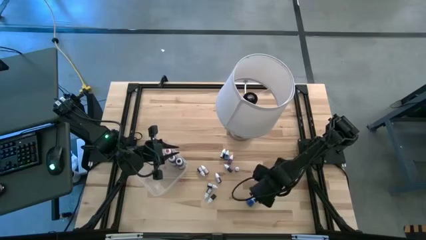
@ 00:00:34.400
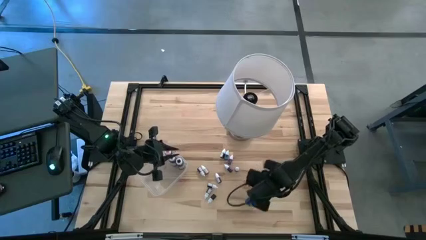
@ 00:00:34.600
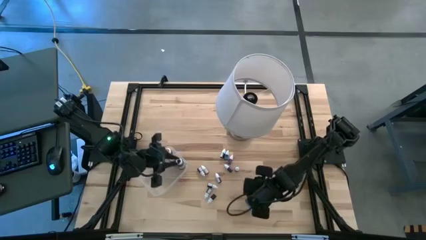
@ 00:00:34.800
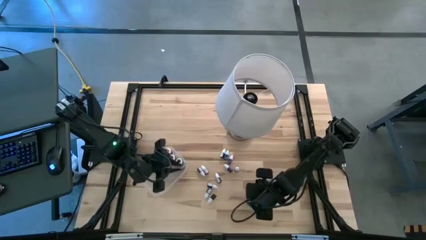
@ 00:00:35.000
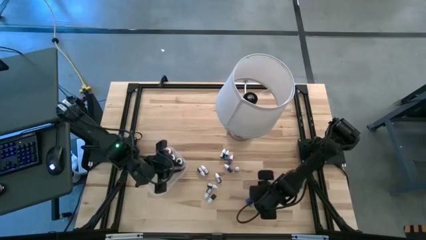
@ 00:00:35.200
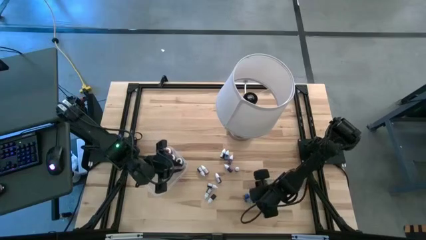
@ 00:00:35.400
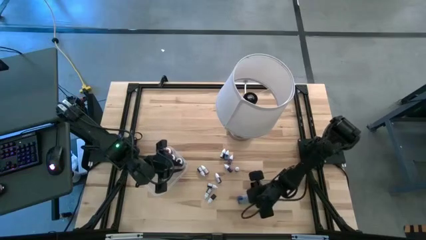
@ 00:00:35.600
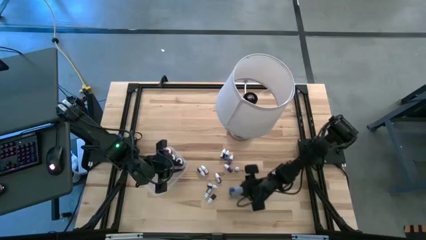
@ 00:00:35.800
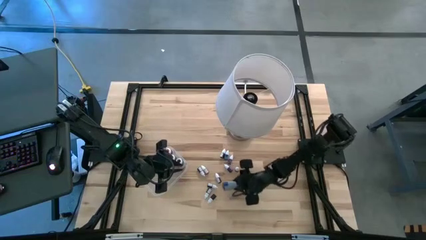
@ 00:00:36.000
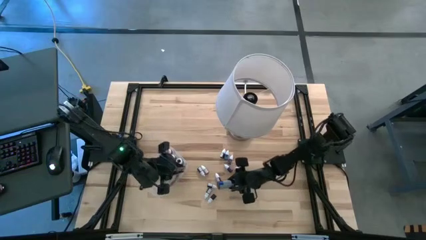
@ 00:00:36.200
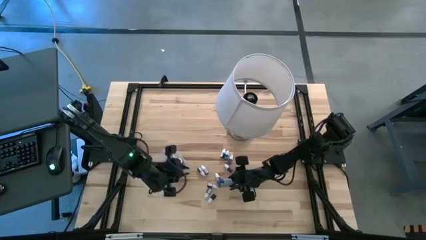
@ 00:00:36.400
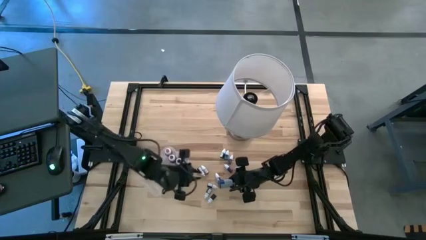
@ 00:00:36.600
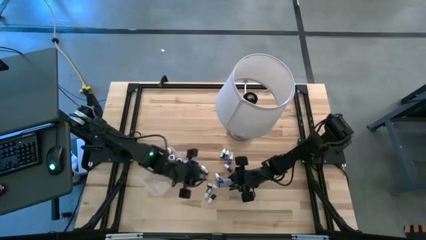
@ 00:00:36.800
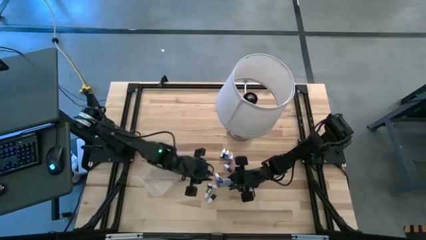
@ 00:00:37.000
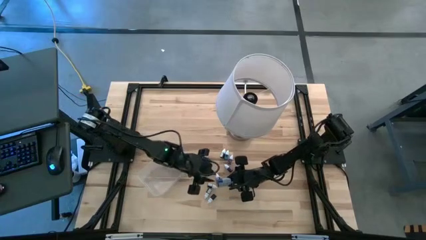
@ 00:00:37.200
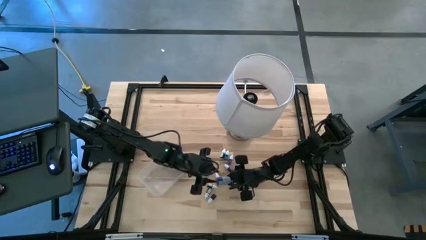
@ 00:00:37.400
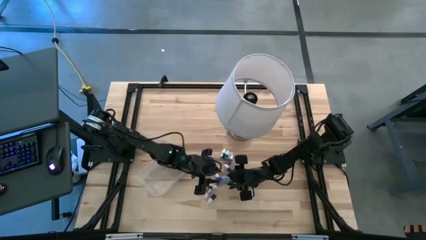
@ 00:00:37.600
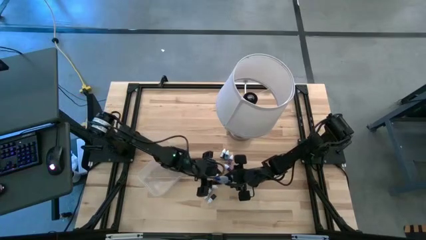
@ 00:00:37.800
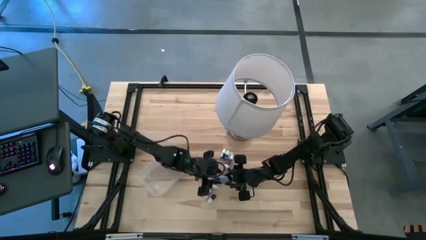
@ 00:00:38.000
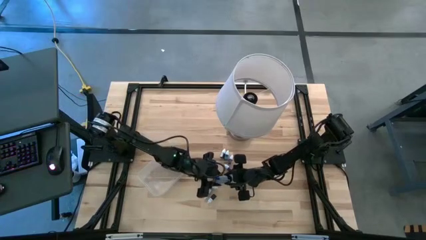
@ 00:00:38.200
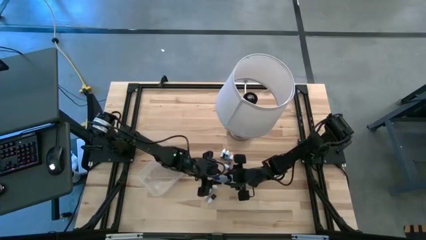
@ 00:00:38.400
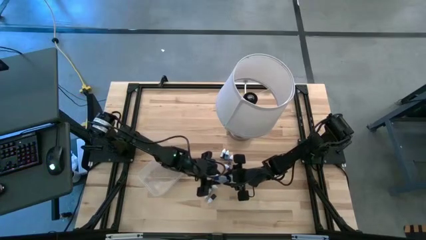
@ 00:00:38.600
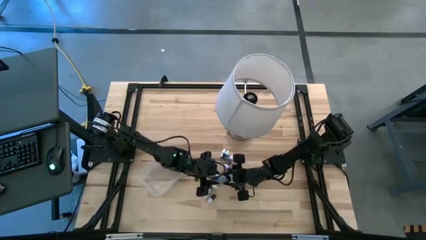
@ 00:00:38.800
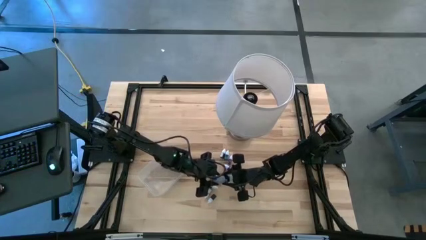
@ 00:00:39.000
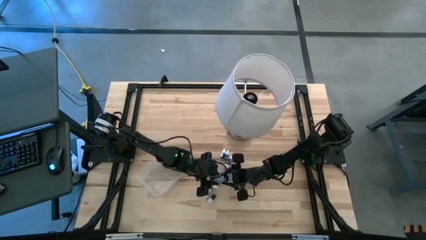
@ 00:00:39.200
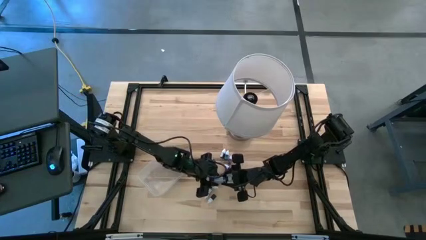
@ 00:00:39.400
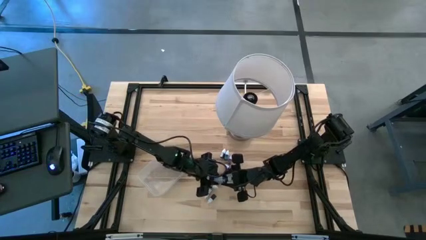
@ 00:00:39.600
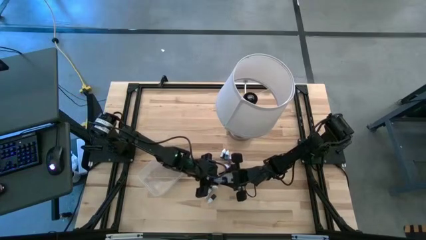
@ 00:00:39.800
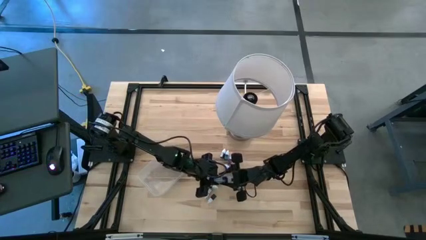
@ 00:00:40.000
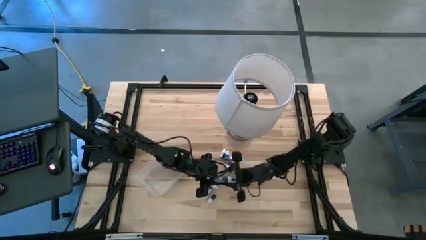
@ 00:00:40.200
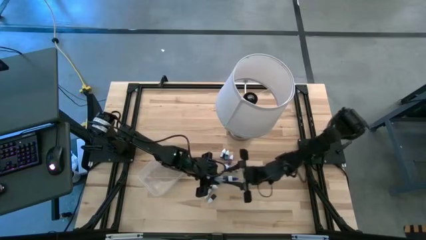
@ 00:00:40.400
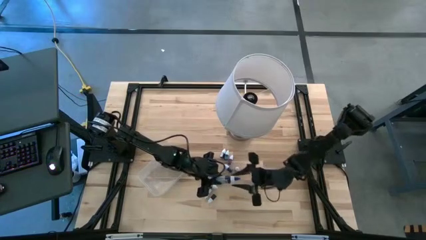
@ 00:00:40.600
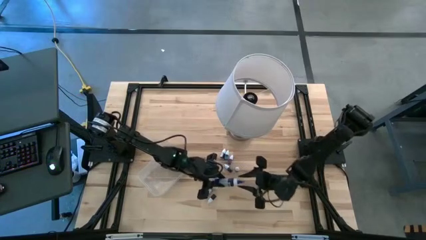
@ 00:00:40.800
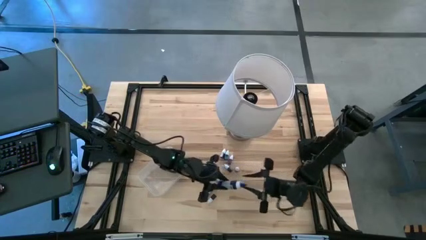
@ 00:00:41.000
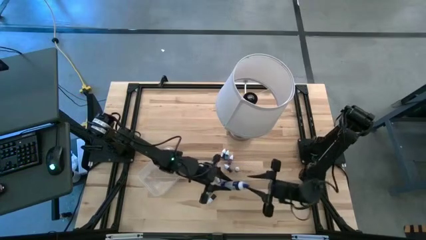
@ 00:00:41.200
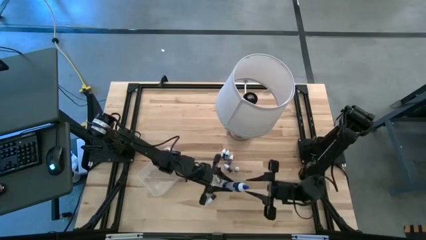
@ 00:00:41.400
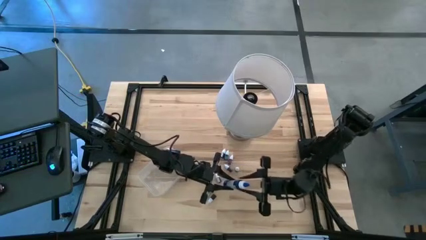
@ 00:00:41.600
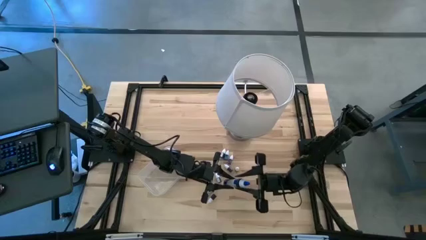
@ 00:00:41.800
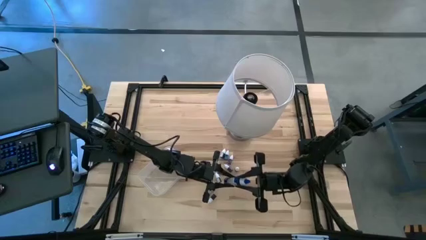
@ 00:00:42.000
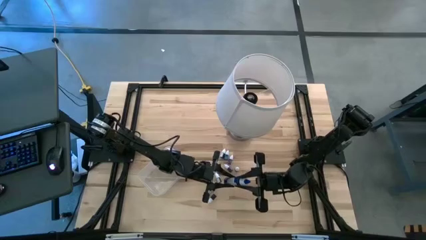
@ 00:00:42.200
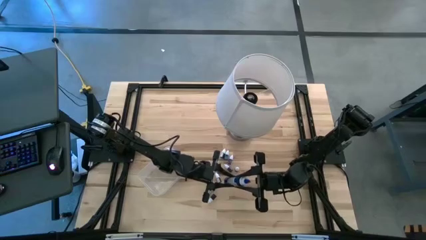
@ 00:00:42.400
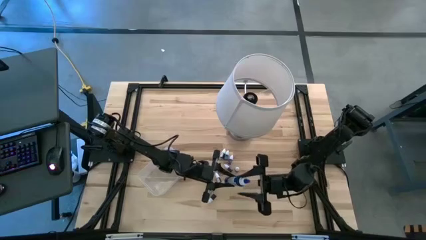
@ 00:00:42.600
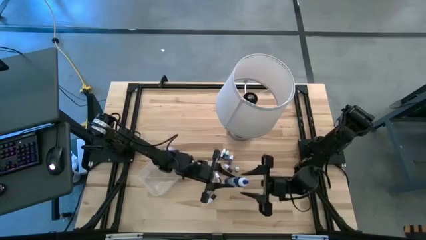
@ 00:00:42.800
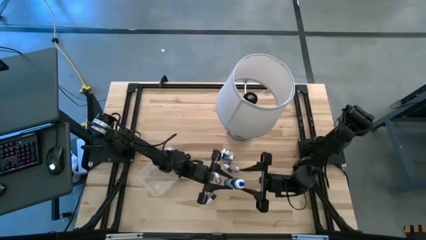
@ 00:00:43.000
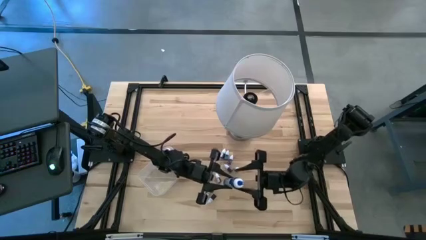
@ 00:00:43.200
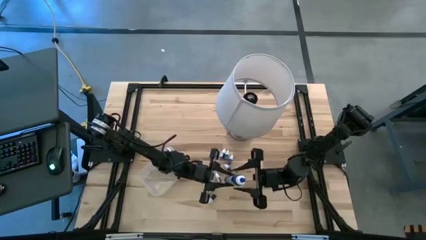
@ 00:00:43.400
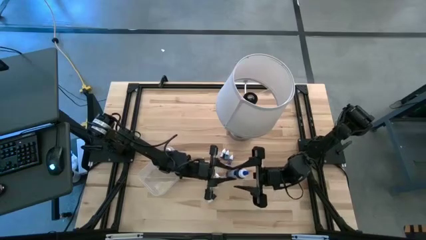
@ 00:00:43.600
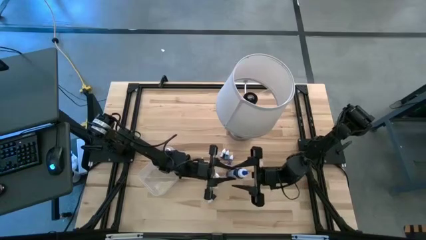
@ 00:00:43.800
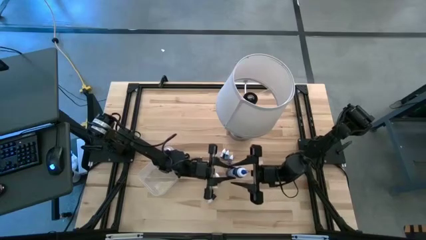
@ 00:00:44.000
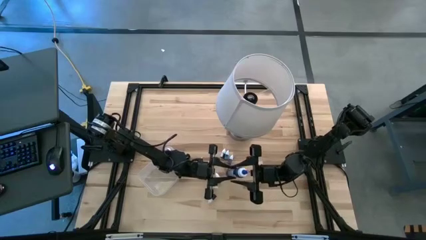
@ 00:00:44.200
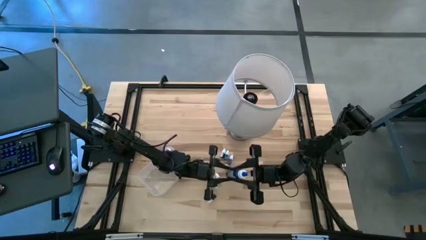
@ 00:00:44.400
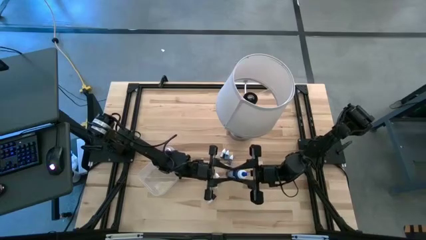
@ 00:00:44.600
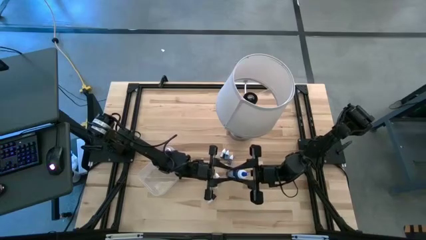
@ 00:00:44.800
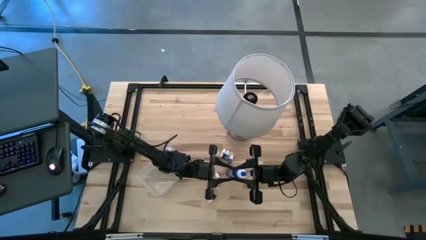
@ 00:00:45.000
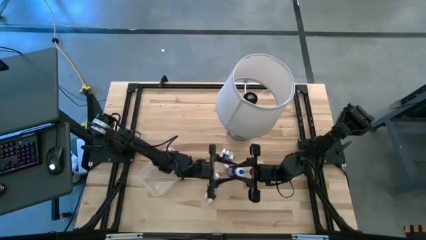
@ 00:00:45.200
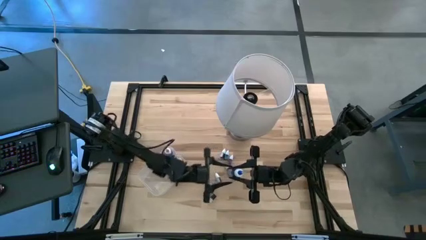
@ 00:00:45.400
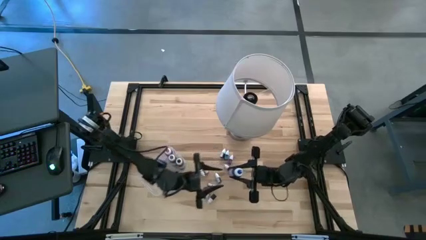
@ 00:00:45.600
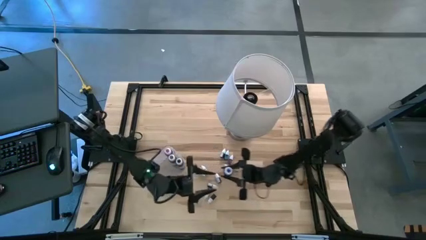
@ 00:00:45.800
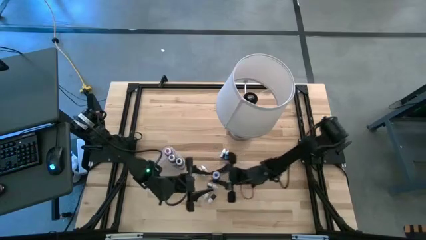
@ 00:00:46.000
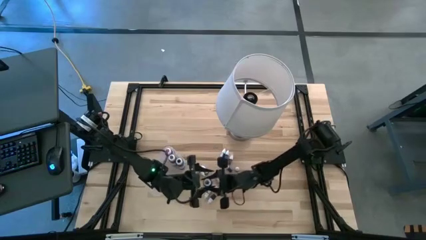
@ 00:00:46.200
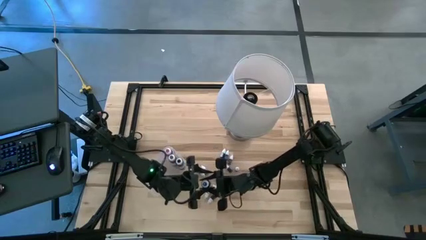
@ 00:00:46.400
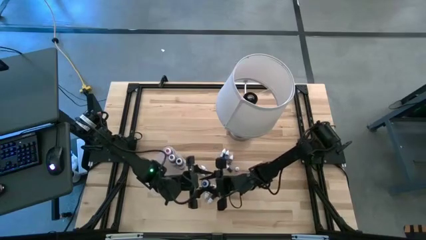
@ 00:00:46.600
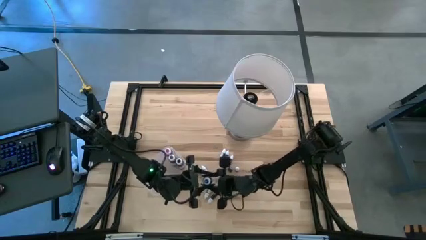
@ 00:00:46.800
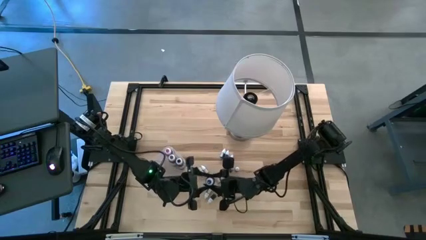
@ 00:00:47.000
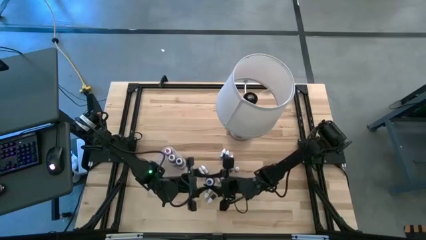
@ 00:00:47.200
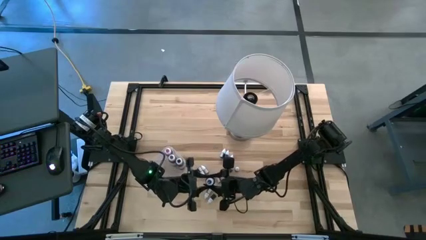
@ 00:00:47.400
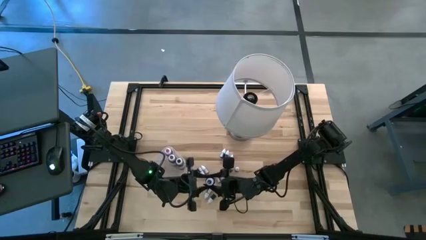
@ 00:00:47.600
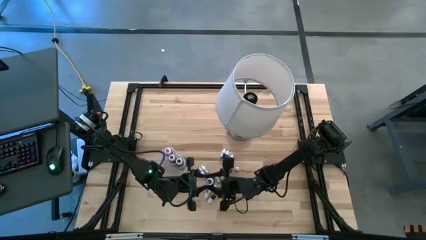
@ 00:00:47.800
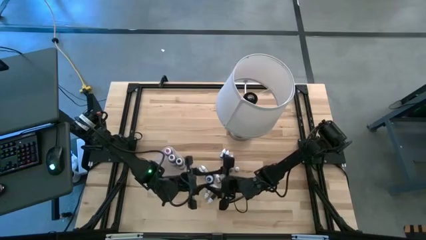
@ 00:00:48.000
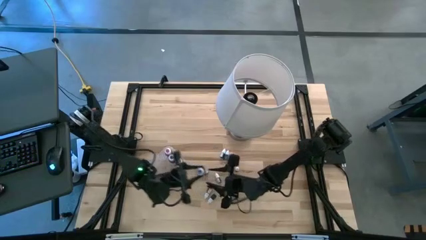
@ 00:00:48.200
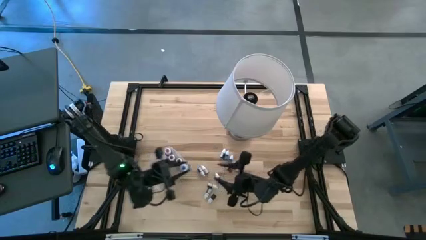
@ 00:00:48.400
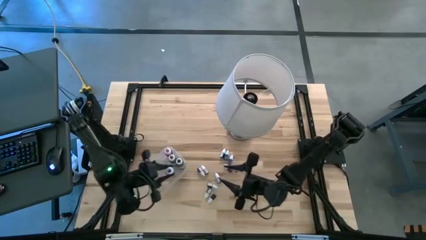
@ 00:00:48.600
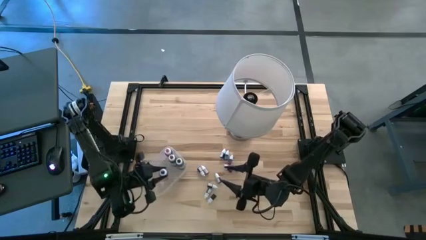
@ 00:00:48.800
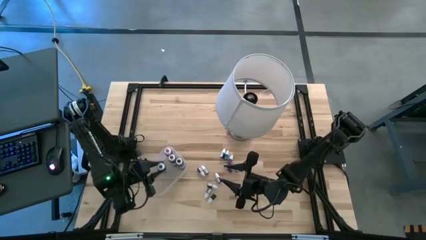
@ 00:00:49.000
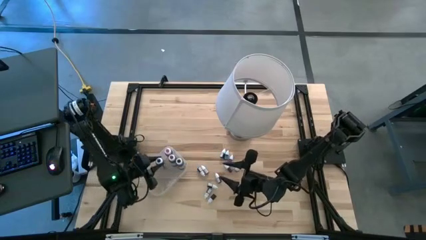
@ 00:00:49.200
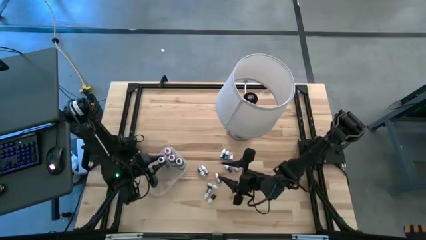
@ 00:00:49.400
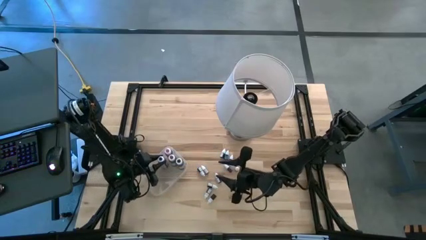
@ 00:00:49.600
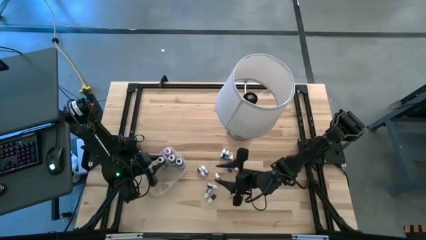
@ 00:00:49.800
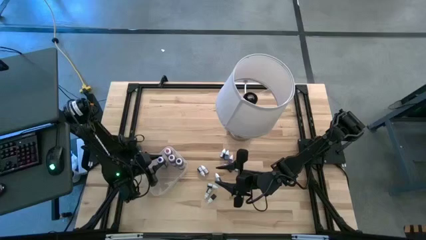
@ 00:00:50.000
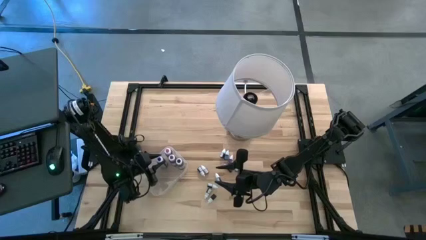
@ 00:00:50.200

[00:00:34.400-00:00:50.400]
Task: Pick & Place food coloring
Put the blue food coloring bottle into the transparent bin
